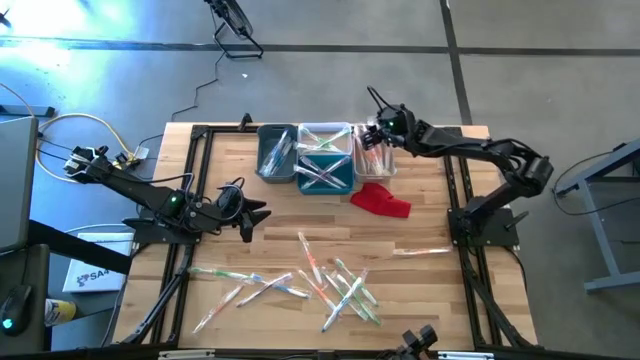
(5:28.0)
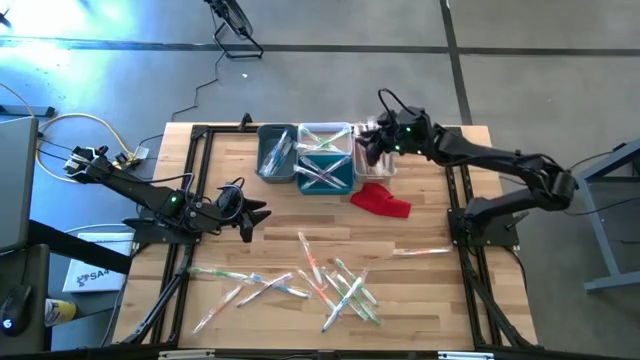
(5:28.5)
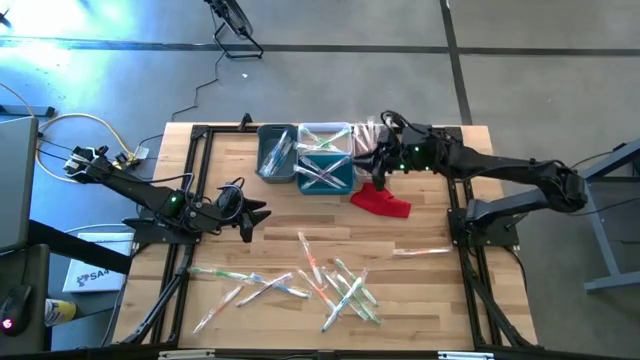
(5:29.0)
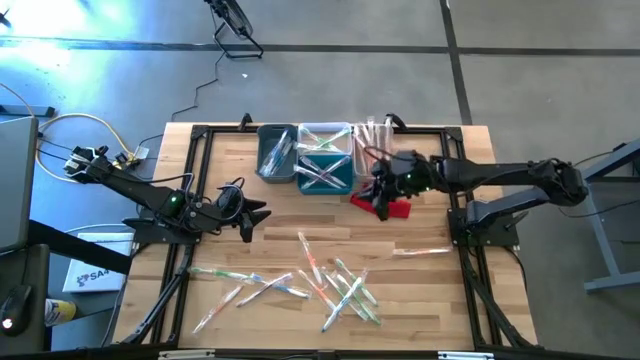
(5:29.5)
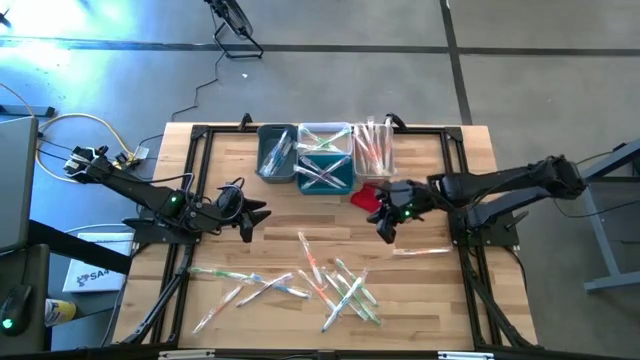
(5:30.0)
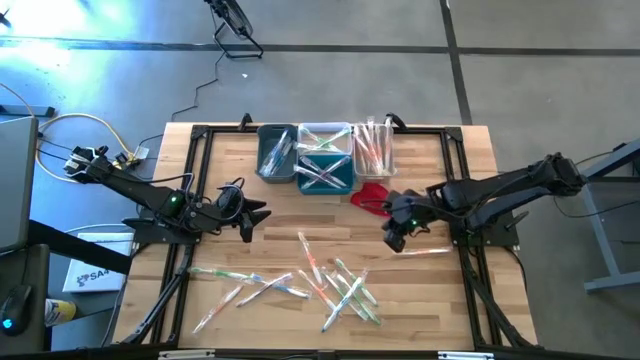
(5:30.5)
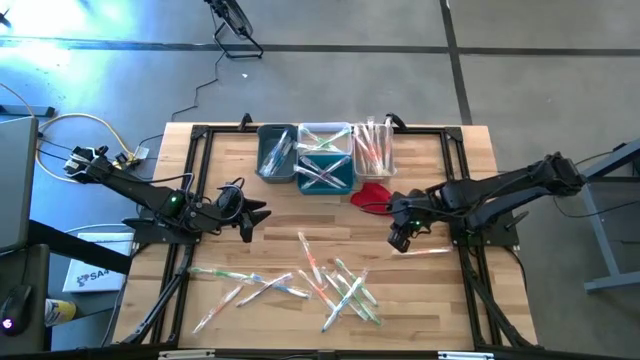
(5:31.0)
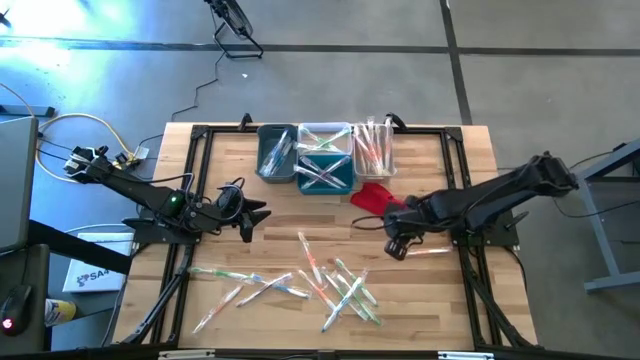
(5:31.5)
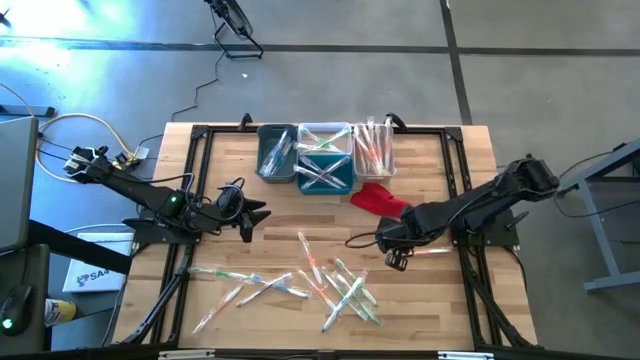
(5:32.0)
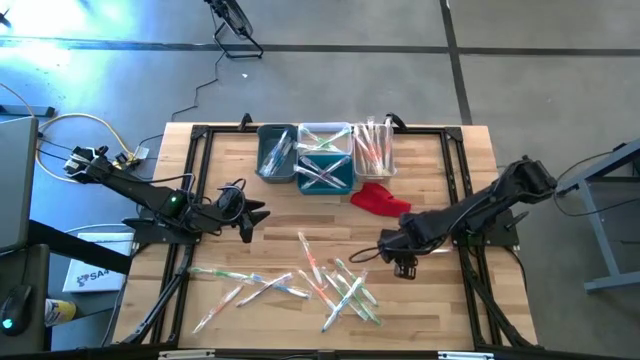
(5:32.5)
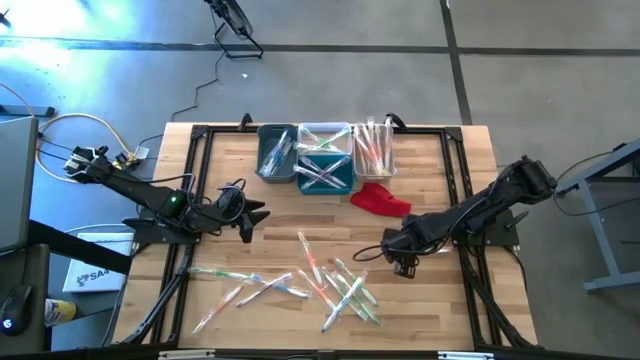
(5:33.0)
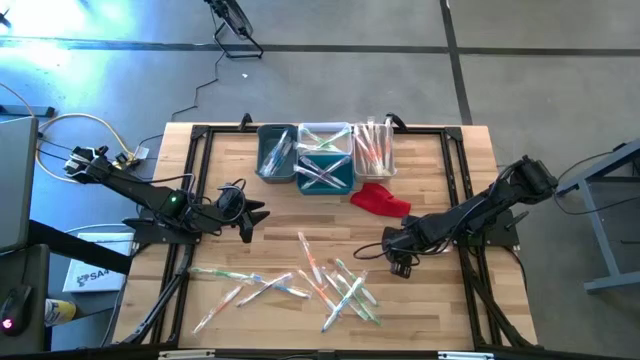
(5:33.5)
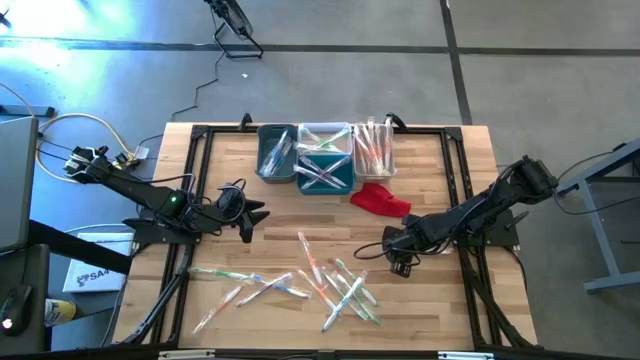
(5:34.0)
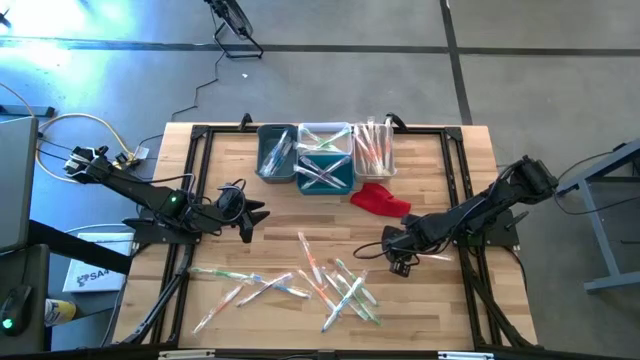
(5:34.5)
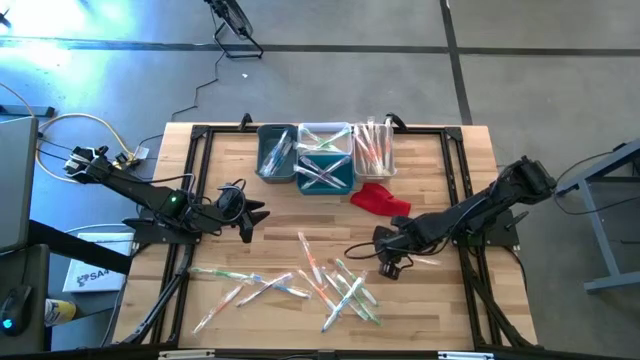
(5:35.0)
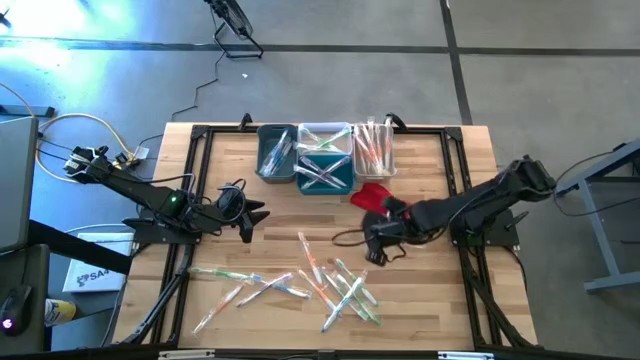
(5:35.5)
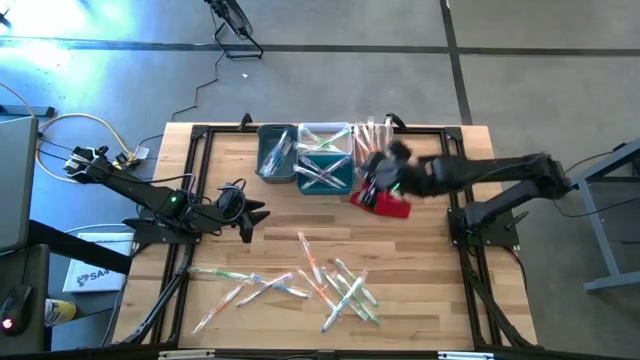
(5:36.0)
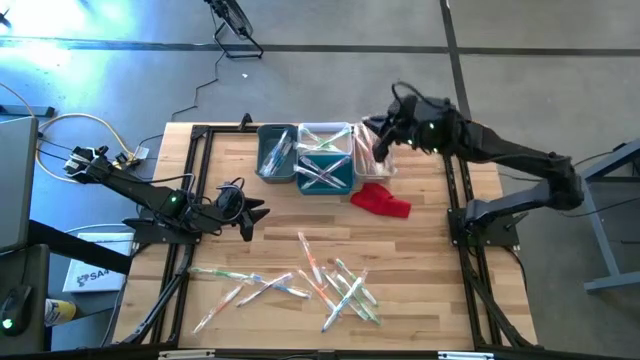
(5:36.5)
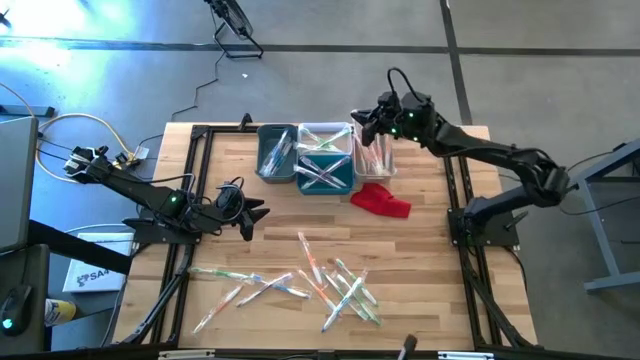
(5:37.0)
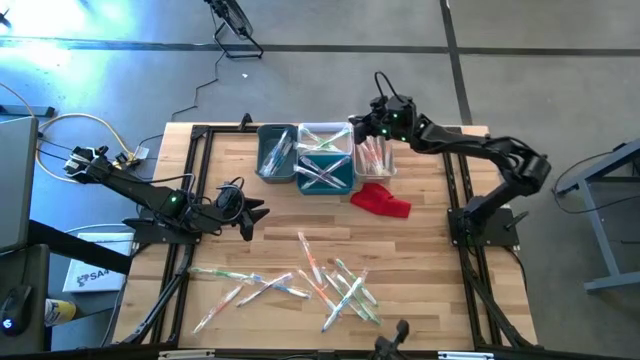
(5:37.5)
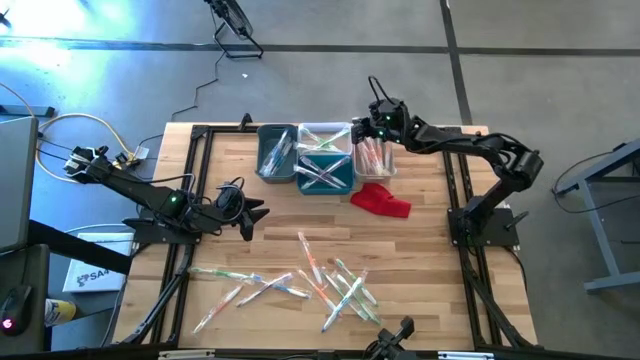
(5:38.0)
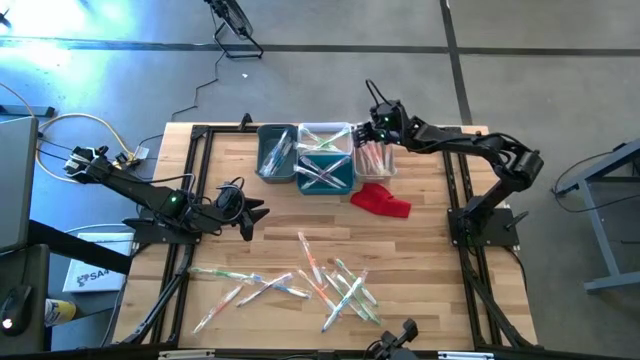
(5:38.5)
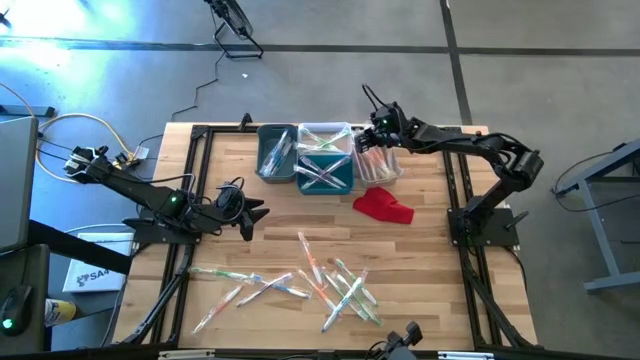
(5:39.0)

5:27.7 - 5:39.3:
Task: Pick & Place Toothbrushes
Put the orange toothbrush into the white bin

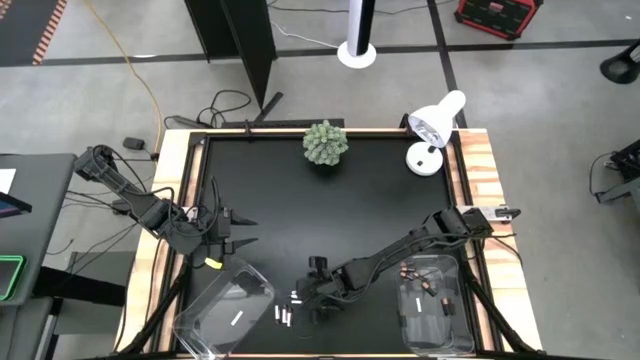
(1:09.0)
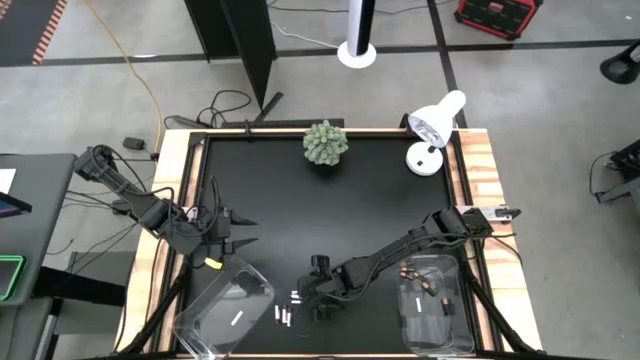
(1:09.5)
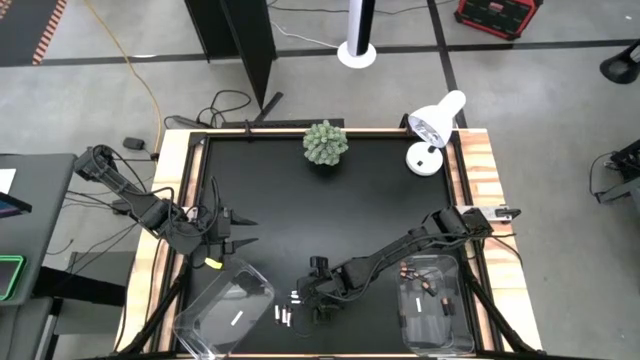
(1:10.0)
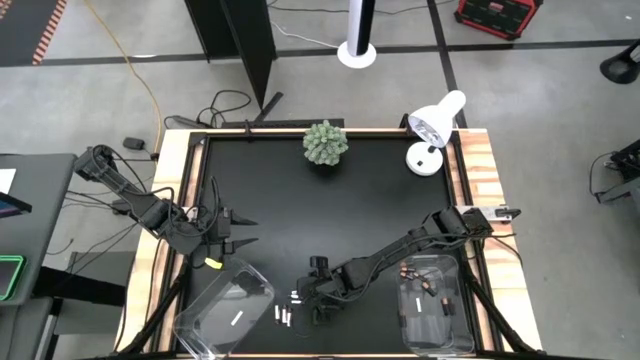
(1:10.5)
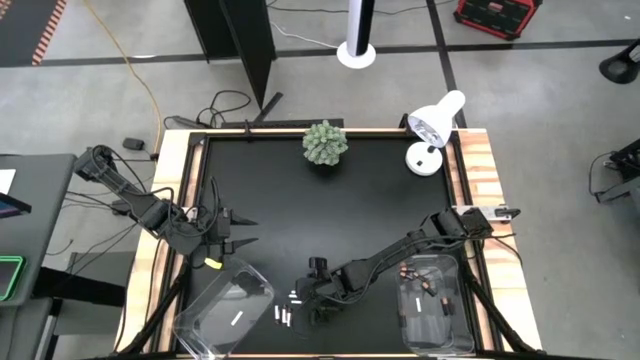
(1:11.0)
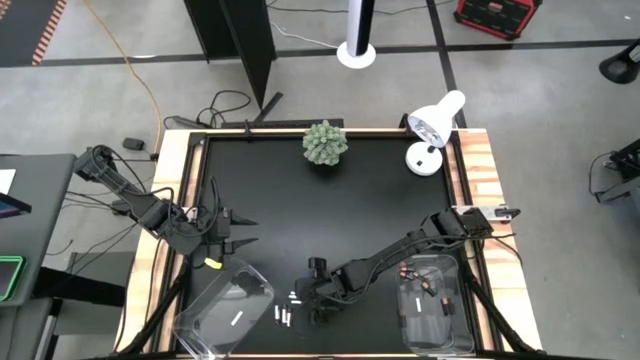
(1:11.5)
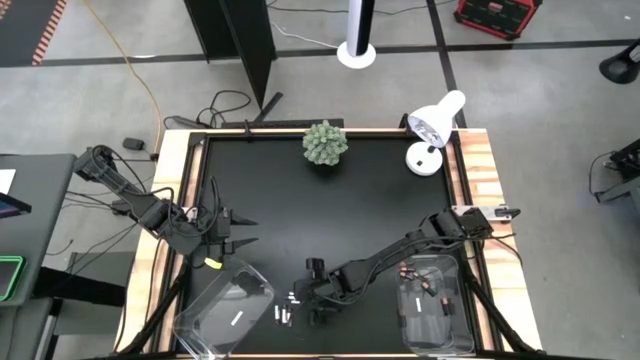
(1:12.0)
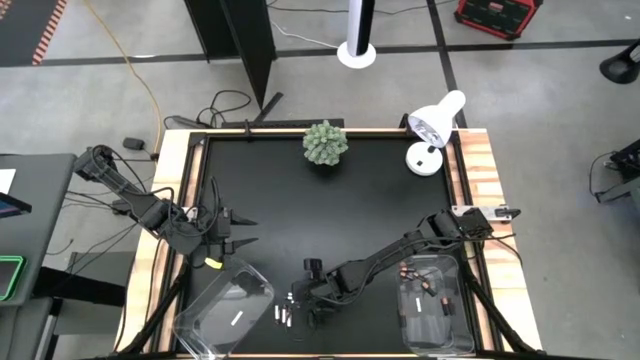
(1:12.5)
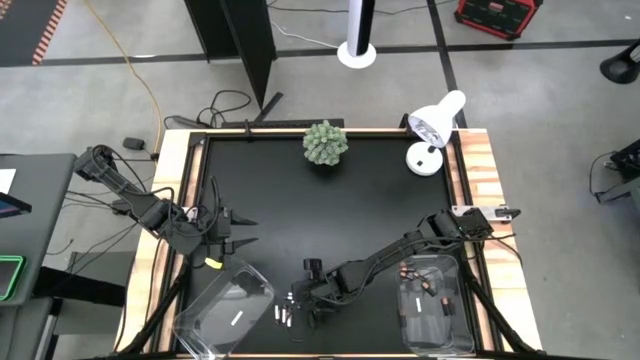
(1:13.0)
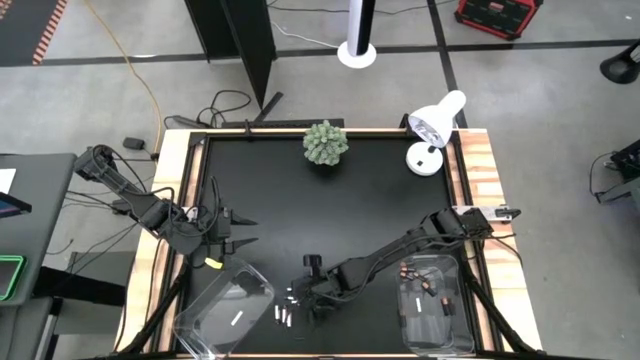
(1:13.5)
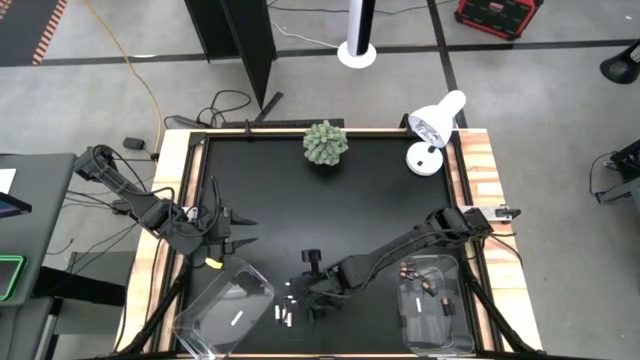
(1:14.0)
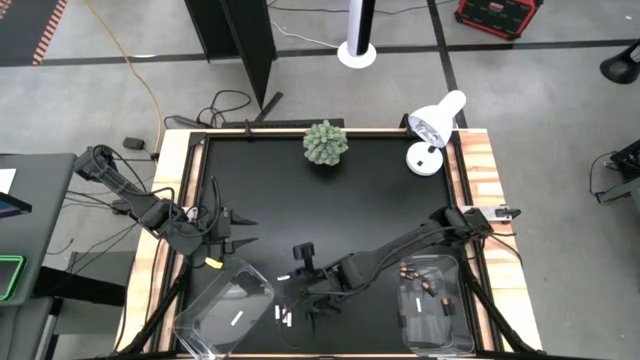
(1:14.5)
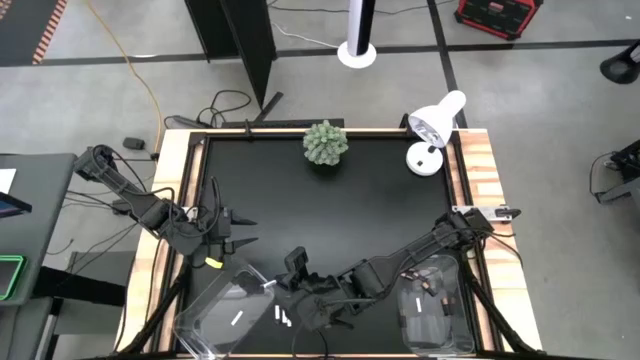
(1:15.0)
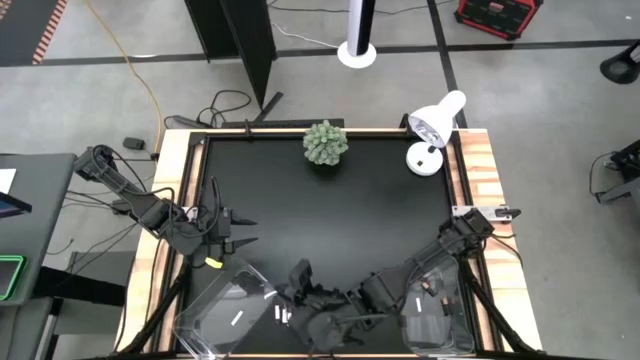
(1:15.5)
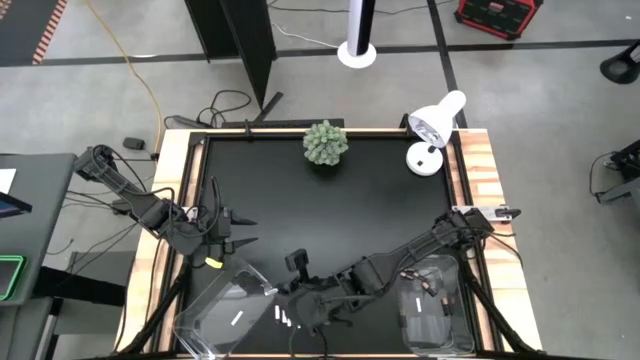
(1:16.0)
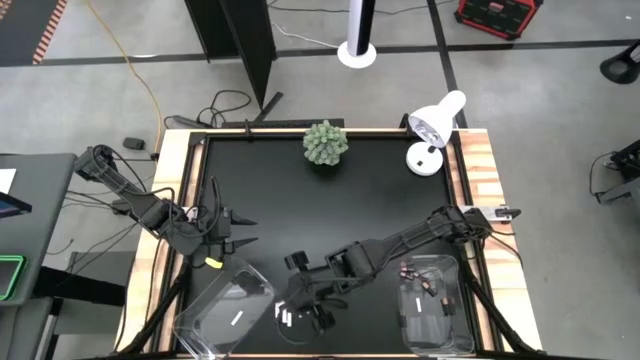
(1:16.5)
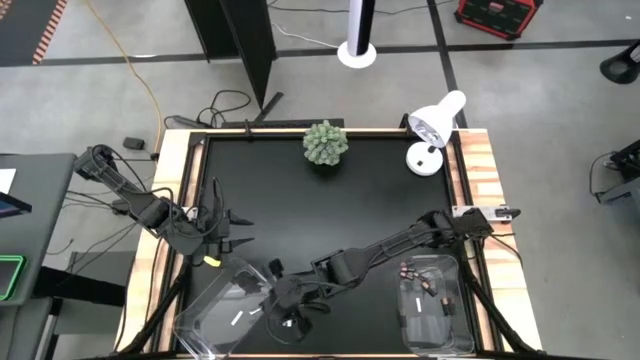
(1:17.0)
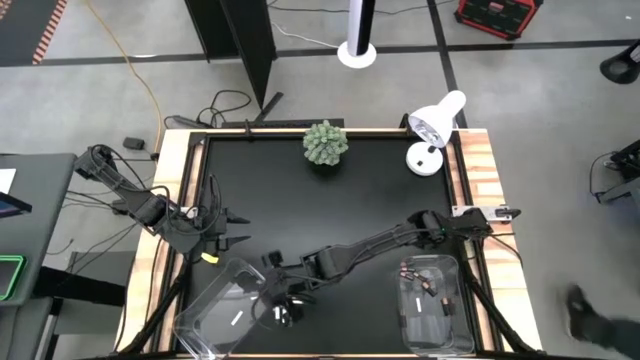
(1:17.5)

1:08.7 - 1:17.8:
Task: Sort batteries
Put the silver battery into the left transparent bin

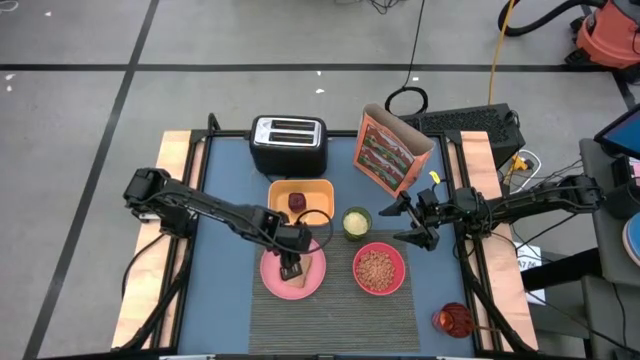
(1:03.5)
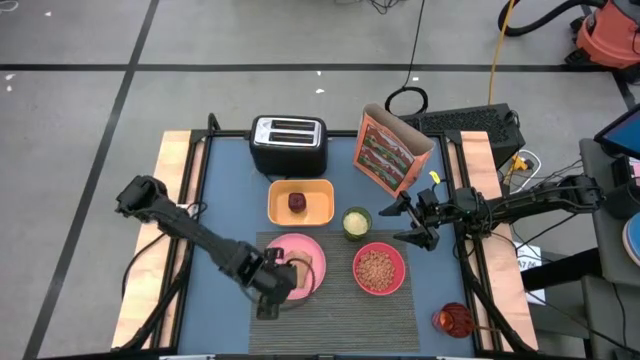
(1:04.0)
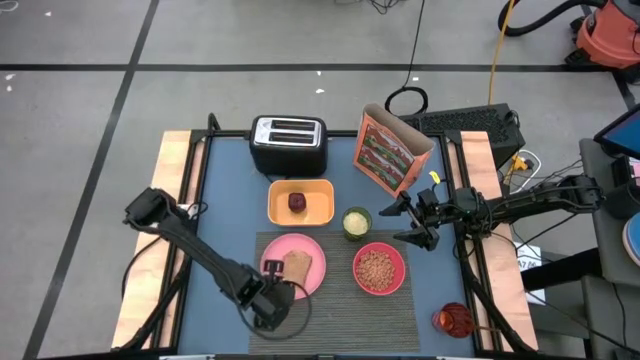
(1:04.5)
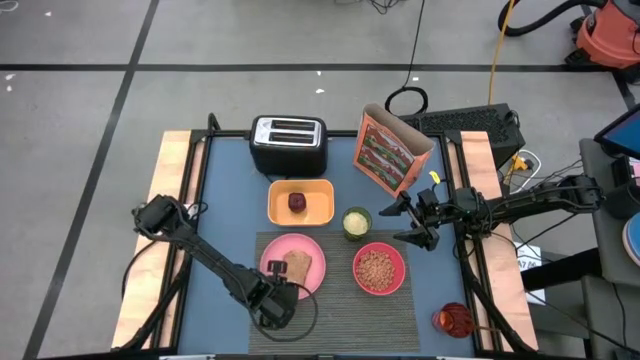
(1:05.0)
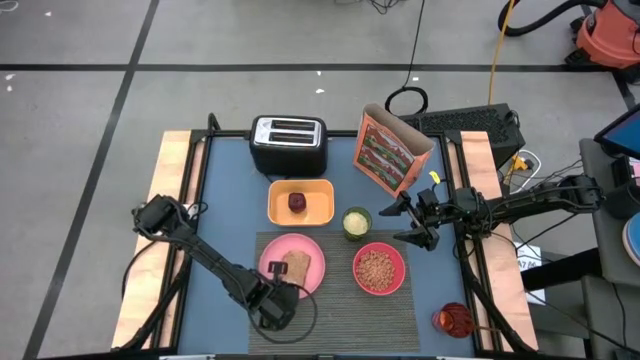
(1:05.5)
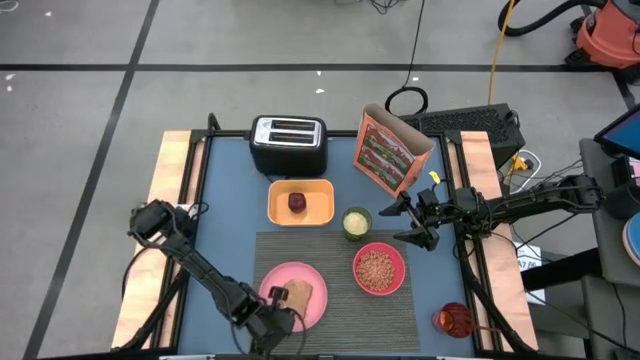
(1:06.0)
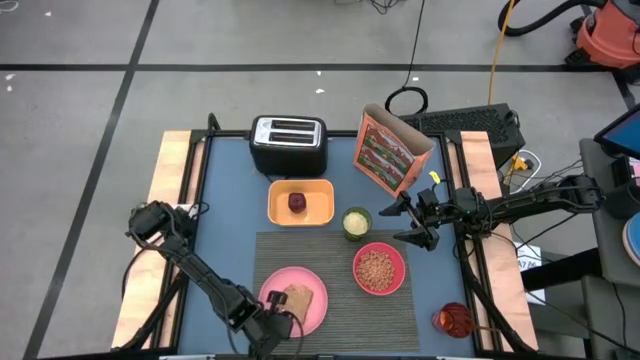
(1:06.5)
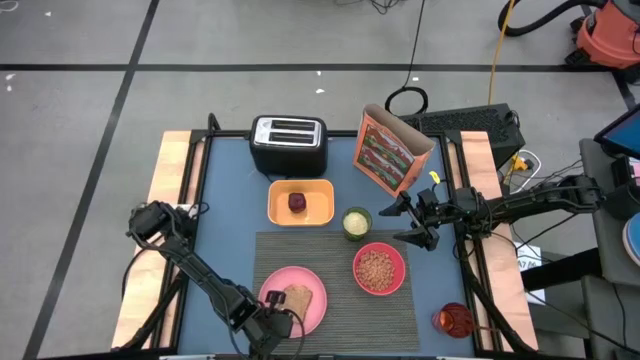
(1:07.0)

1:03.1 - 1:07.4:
Task: Arrange a breakfast setting
Adjust the pink plate on the gray table mat
